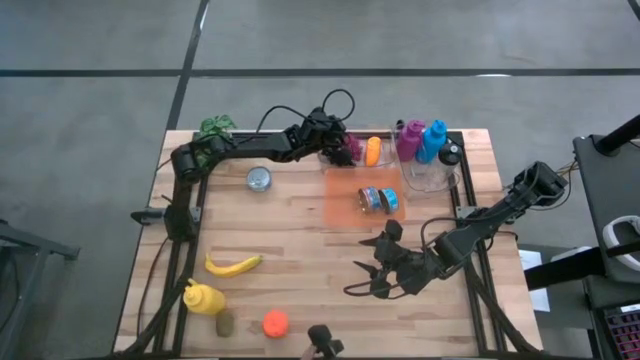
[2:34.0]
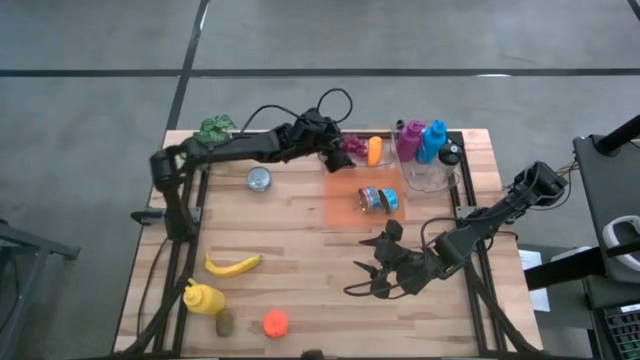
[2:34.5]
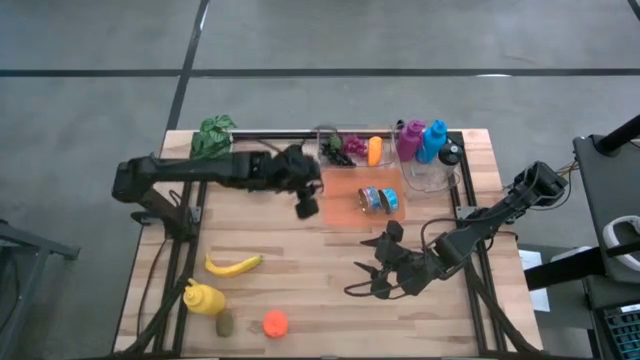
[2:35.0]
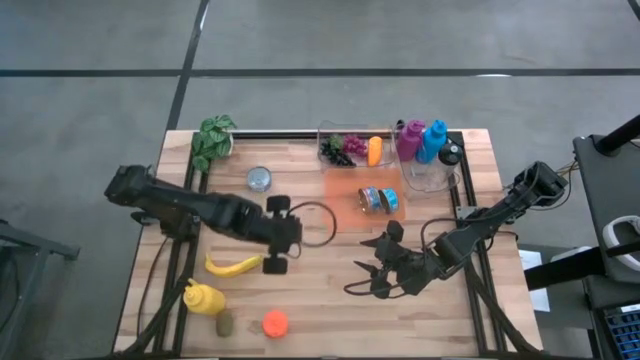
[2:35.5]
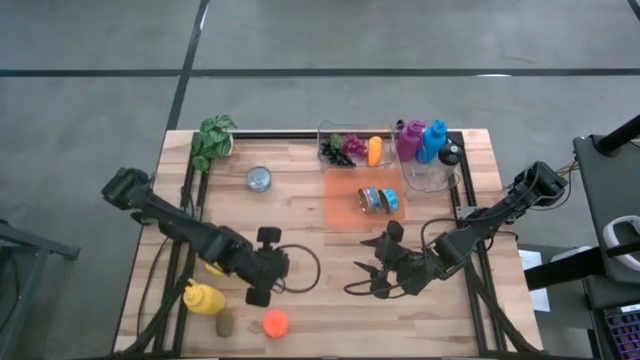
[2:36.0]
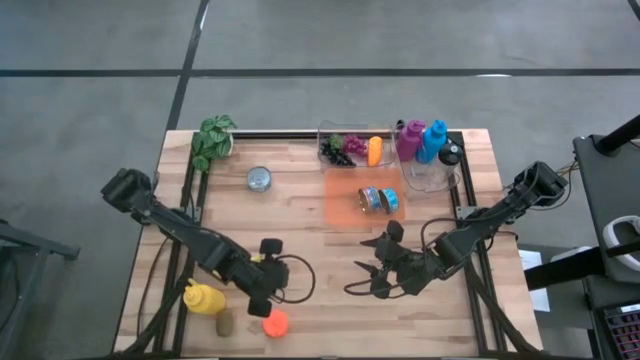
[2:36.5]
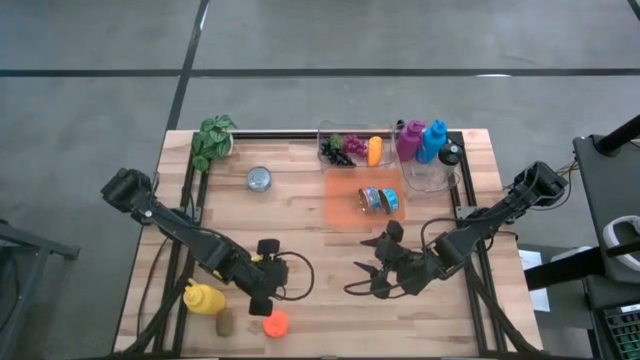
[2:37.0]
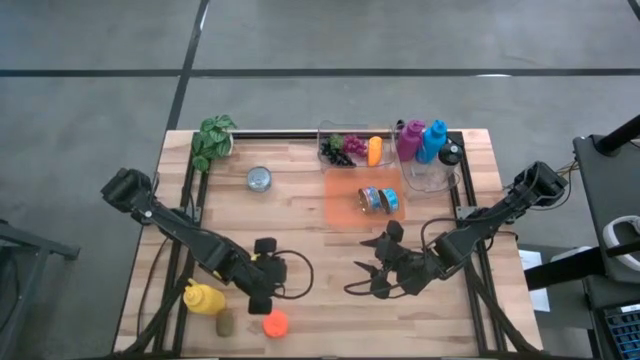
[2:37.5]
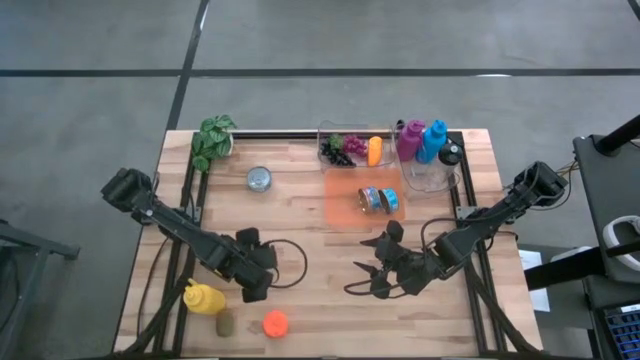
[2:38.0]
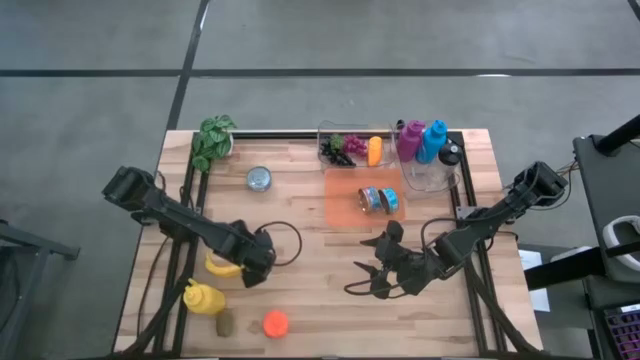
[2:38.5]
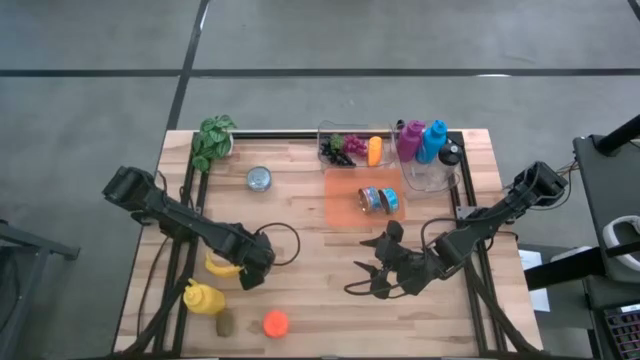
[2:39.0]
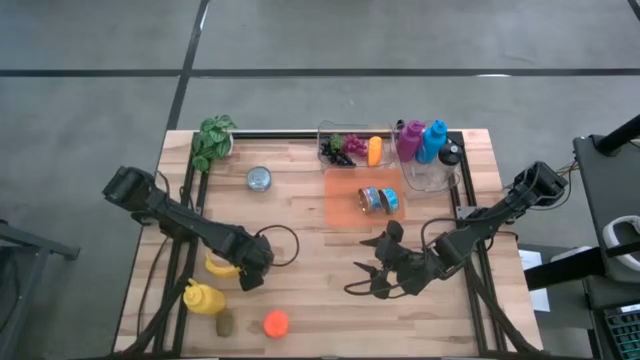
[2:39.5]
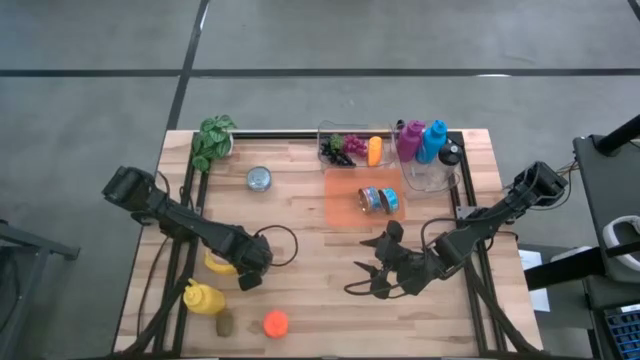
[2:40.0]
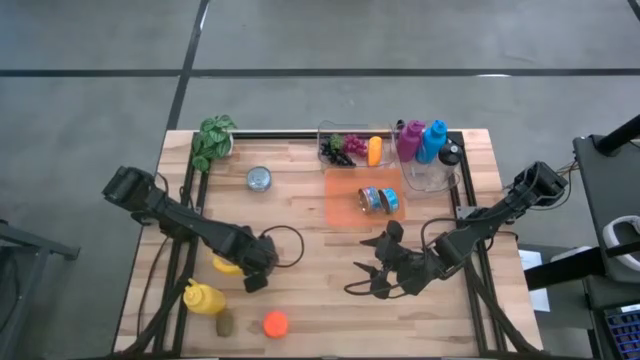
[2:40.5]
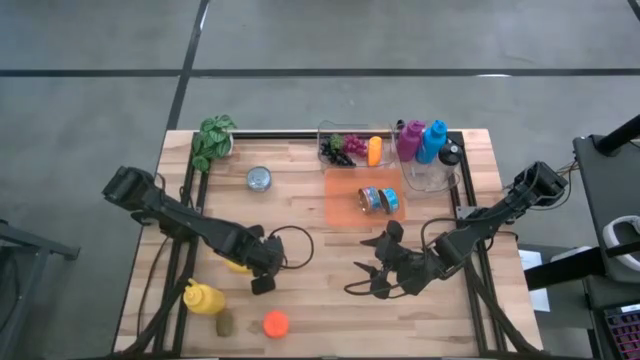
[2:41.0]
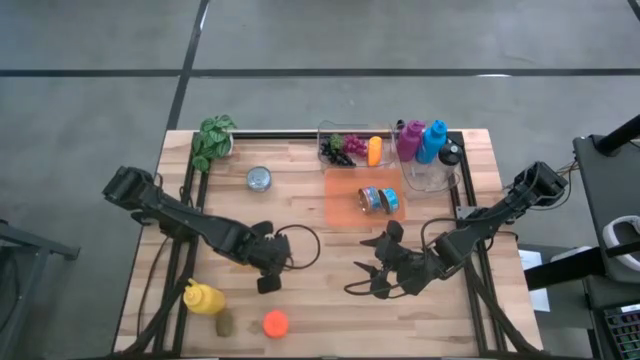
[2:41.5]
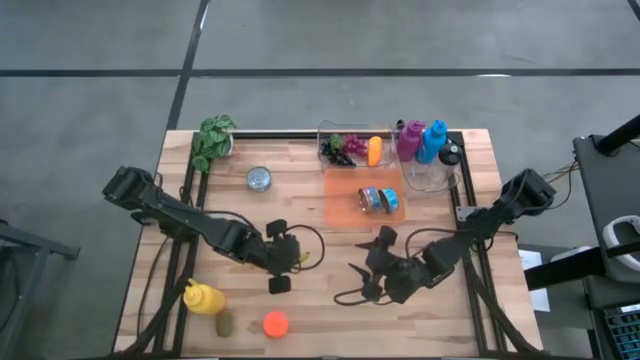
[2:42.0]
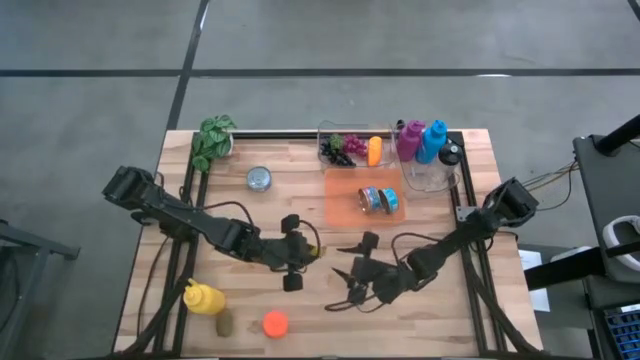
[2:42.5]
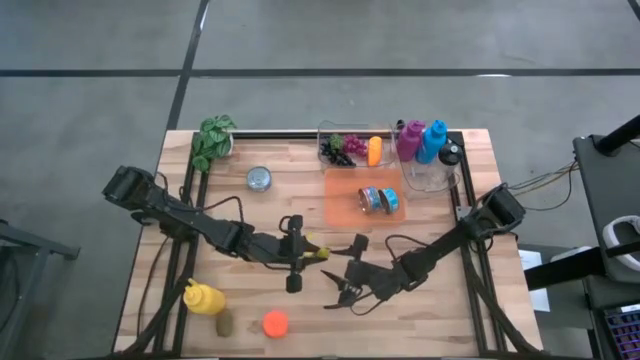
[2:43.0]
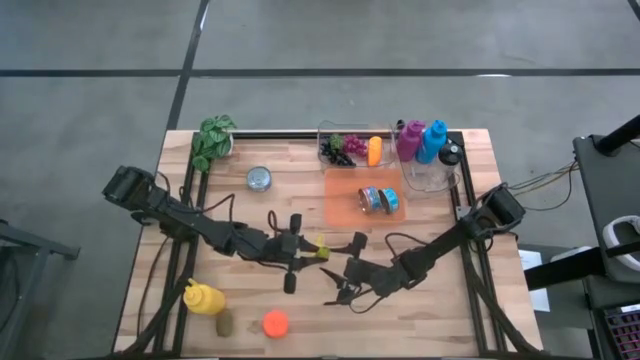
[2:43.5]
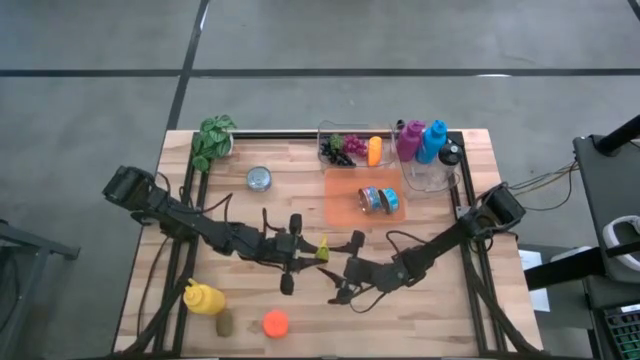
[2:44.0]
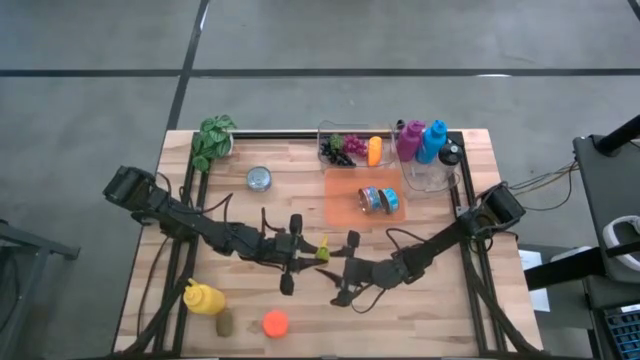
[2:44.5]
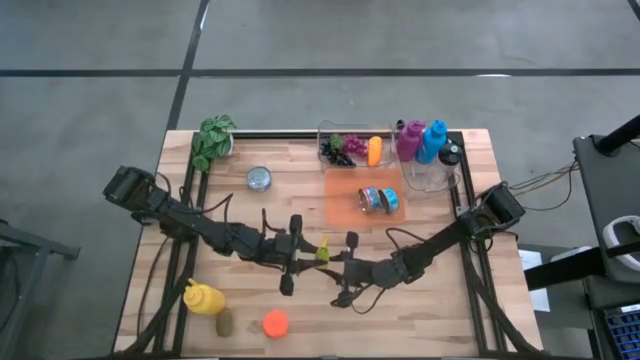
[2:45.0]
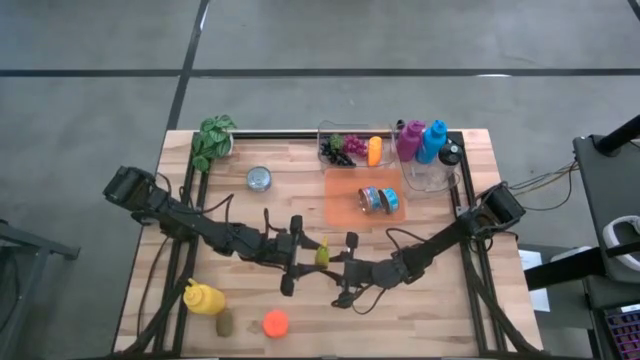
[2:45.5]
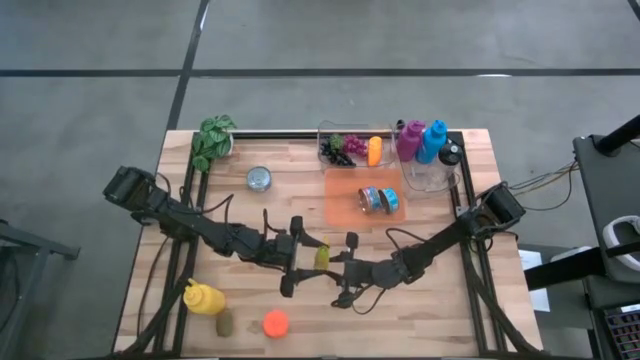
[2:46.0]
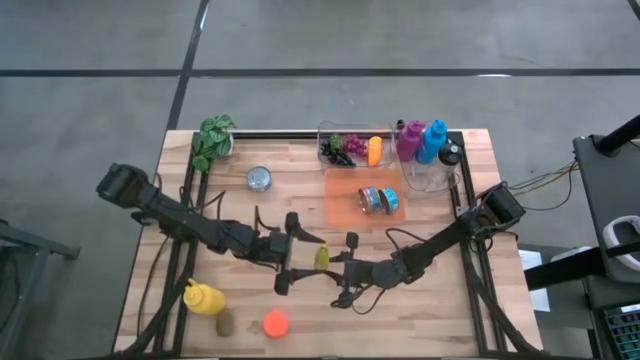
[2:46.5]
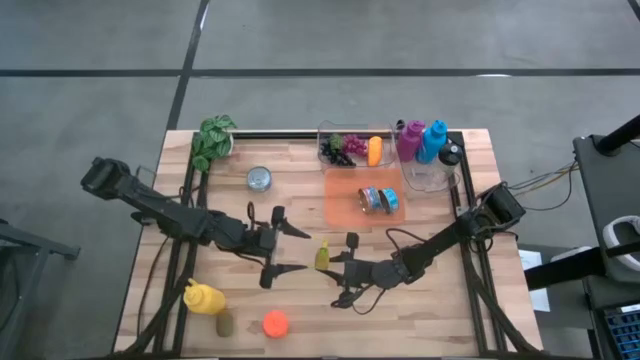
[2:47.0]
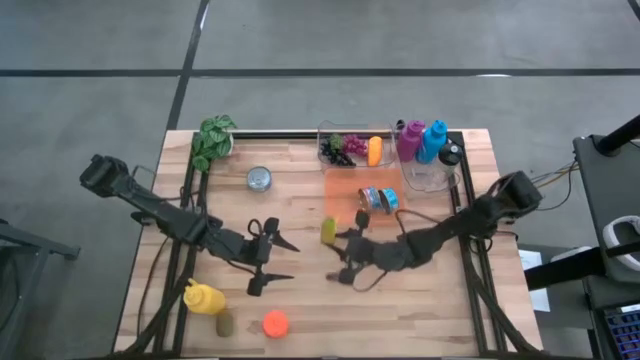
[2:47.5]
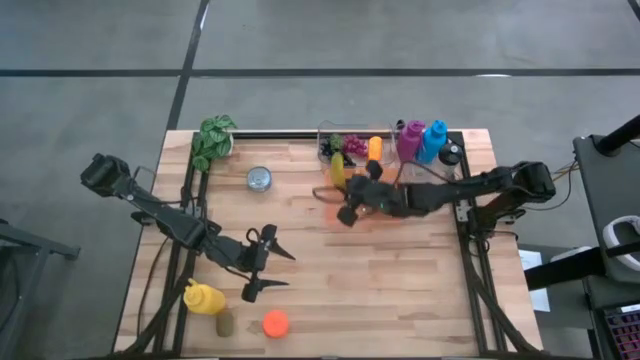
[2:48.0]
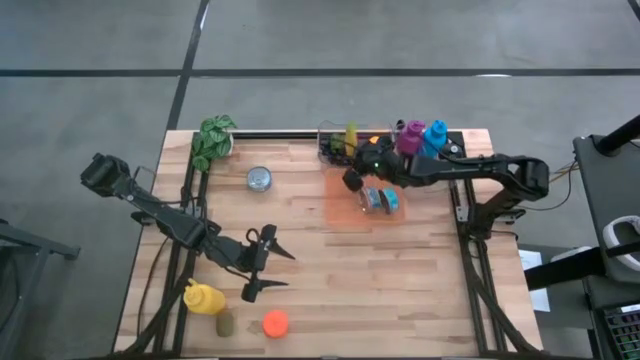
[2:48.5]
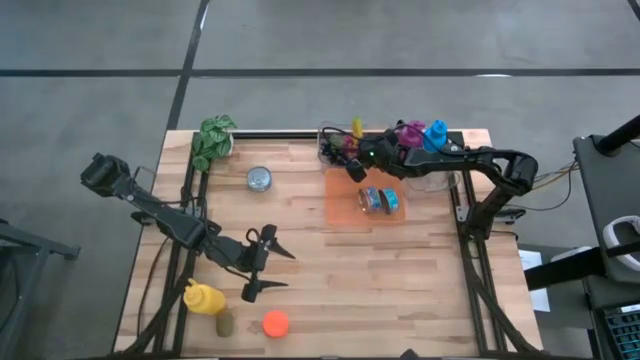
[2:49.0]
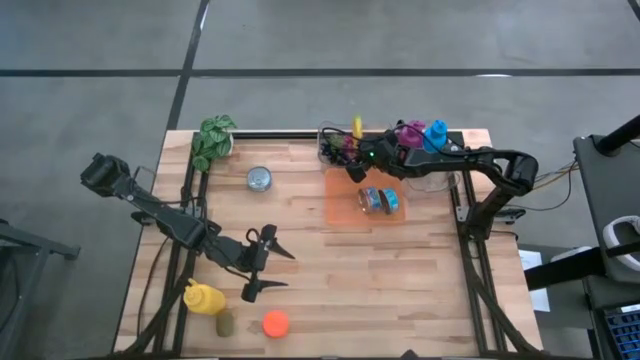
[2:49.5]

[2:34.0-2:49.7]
Task: Pick & Place Food Item
Put the banana into the left transparent bin

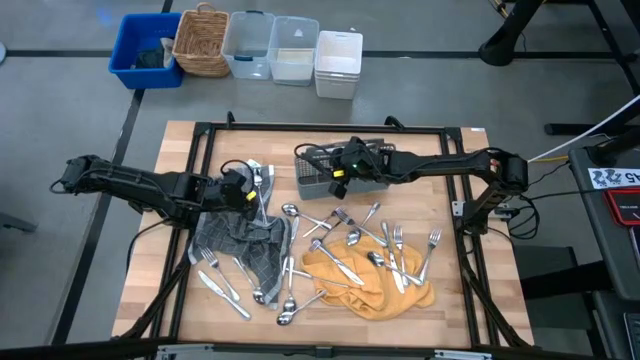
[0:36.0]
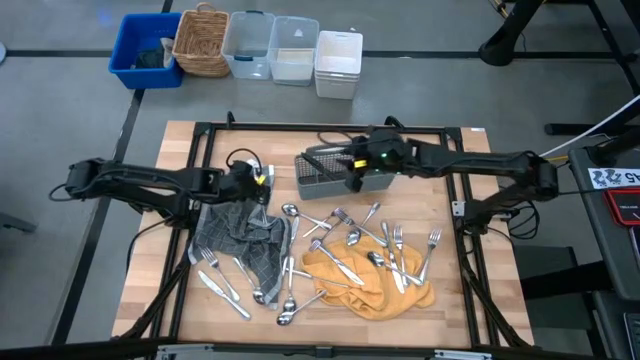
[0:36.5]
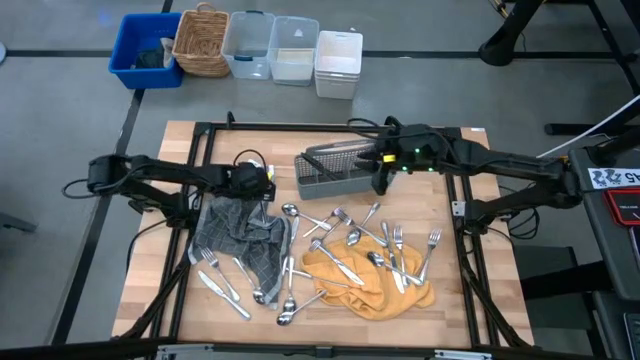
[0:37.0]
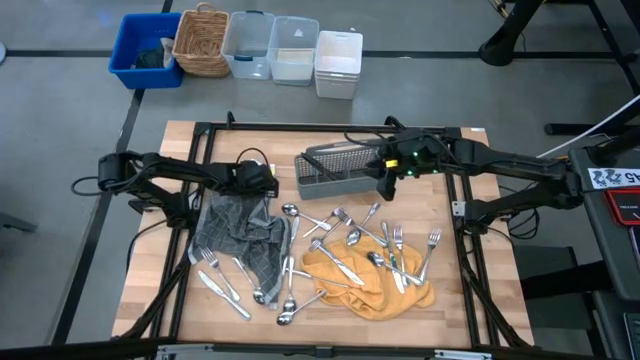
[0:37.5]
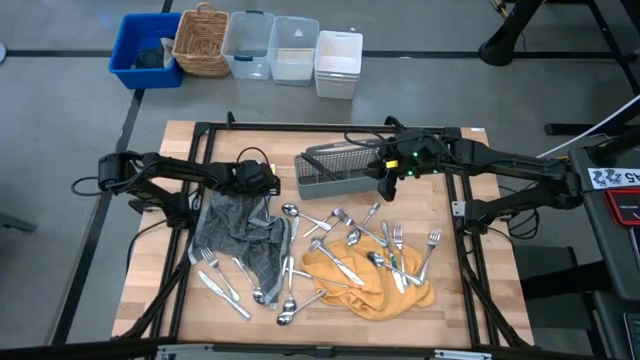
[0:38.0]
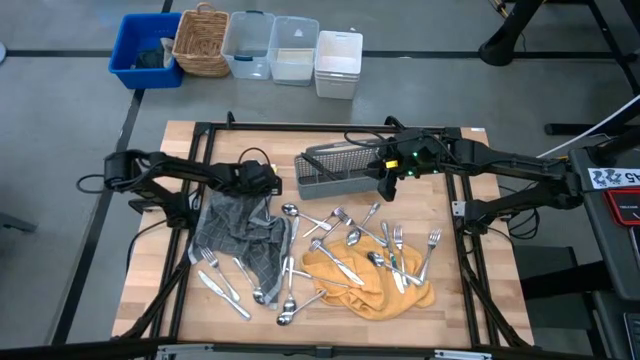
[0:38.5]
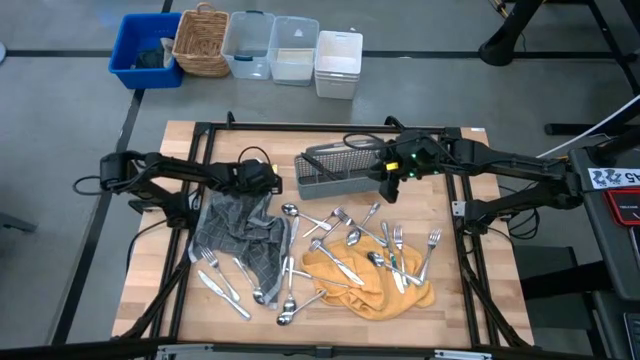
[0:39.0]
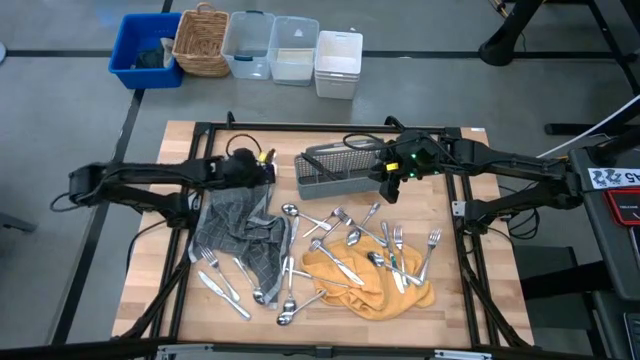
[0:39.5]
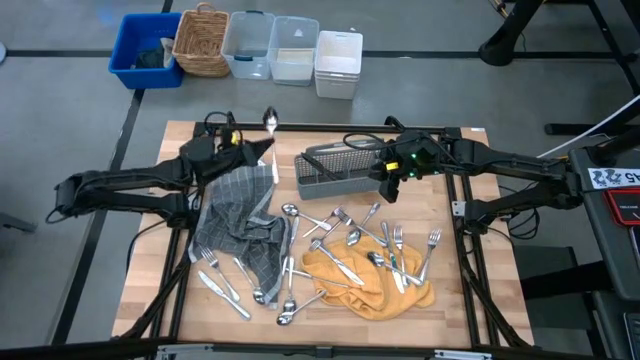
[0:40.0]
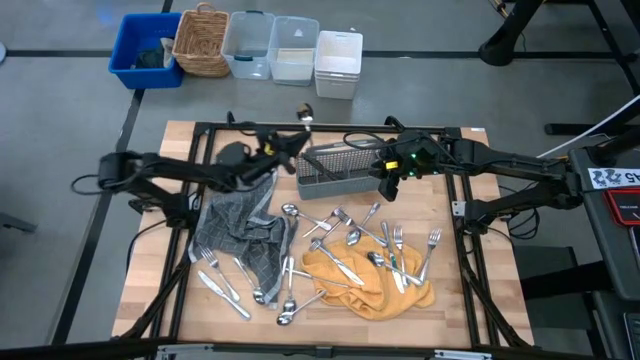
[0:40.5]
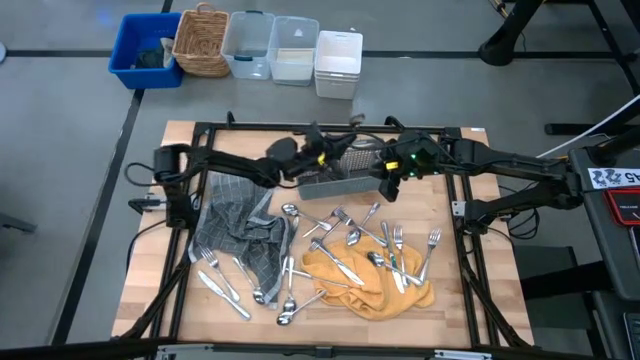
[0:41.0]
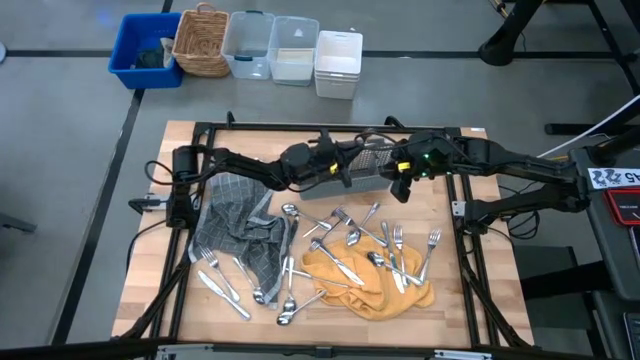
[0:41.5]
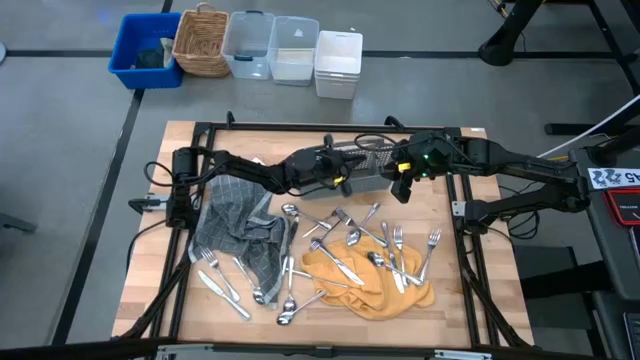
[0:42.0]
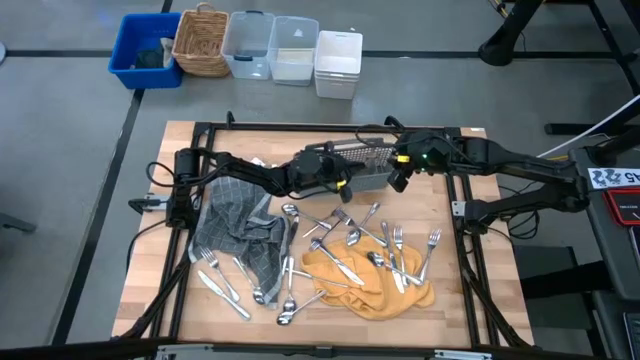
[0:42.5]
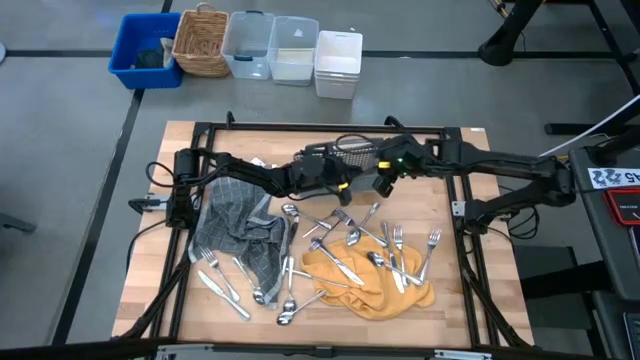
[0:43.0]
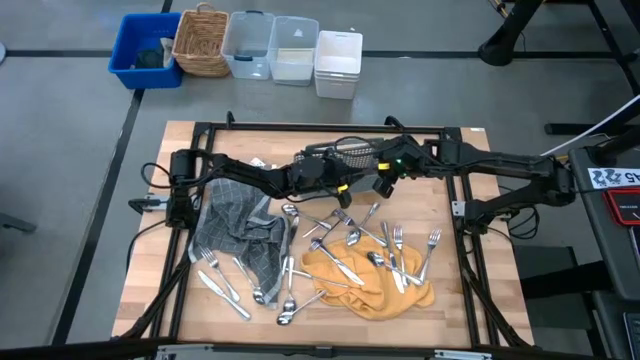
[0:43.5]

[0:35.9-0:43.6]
Task: Sort silverware
Put the silver spoon into the gray utensil holder
